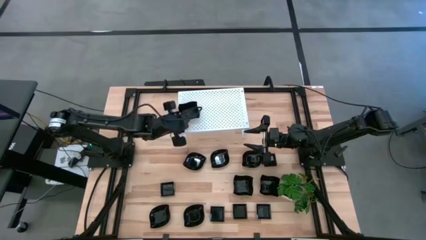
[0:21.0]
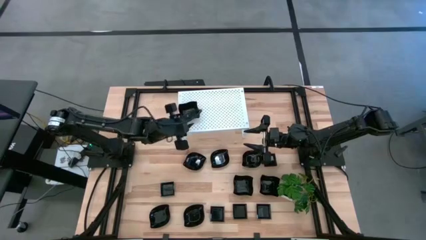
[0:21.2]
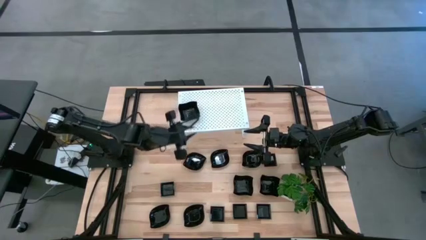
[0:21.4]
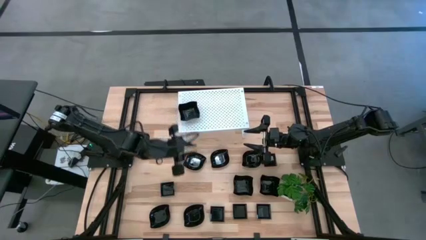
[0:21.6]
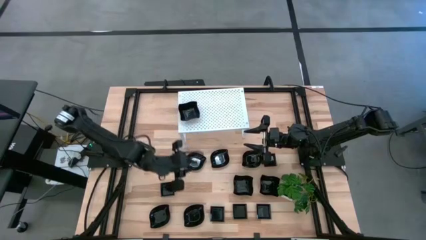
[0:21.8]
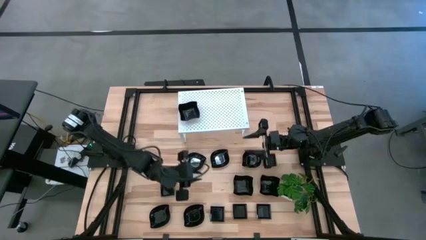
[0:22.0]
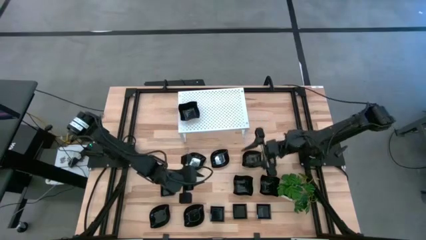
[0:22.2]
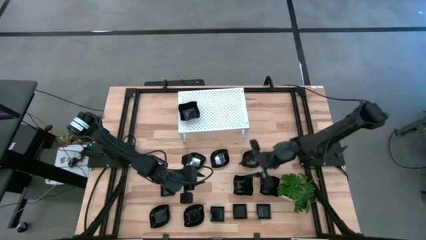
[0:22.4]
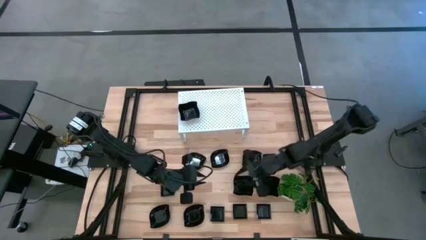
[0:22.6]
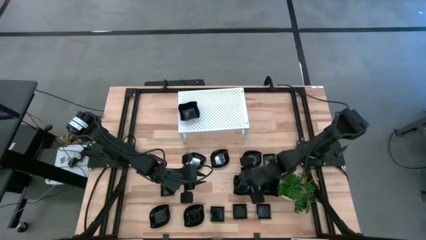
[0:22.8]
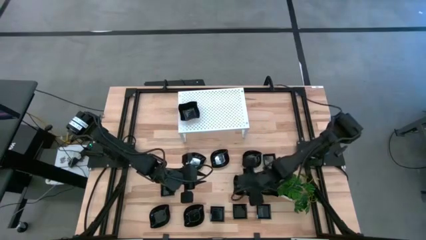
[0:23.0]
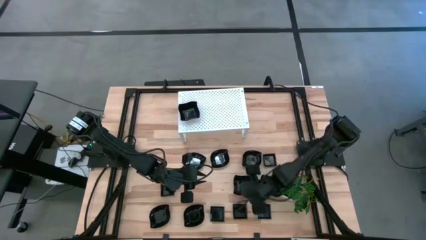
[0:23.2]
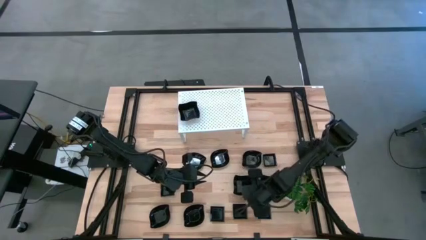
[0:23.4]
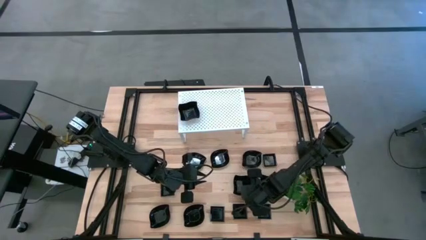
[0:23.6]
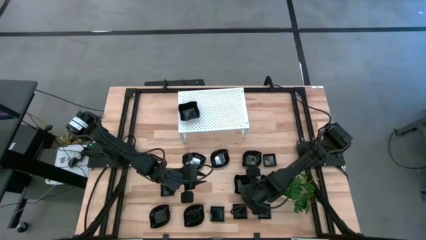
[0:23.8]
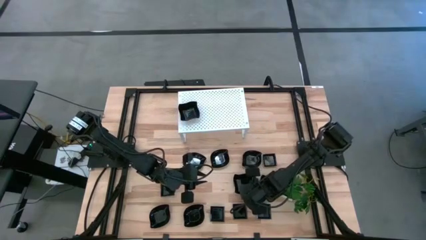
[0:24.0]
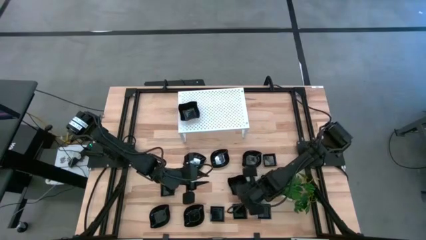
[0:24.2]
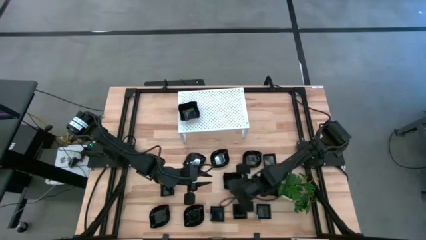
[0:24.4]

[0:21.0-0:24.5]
Task: Pick & Place Mini shaped plates
Stack the black distorted square plate on top of the black distorted square plate on the shelf

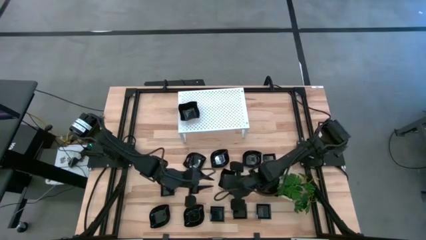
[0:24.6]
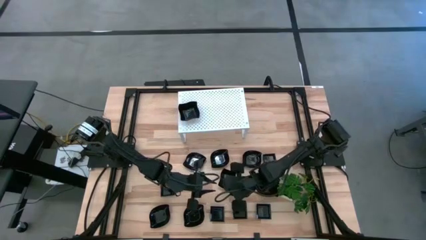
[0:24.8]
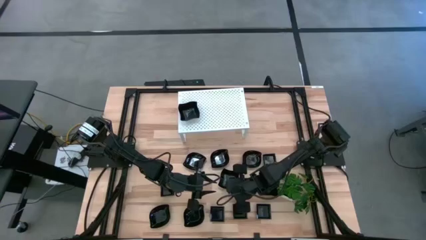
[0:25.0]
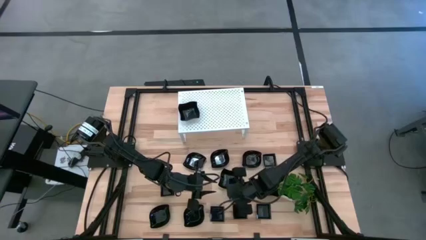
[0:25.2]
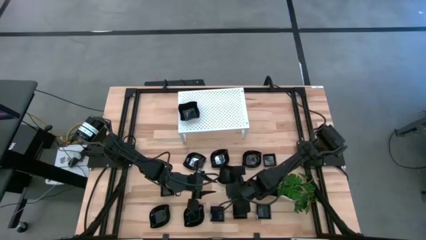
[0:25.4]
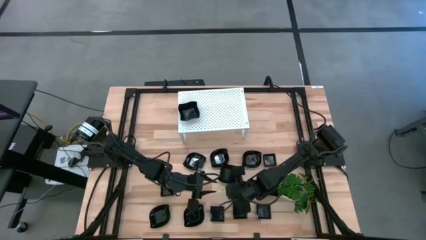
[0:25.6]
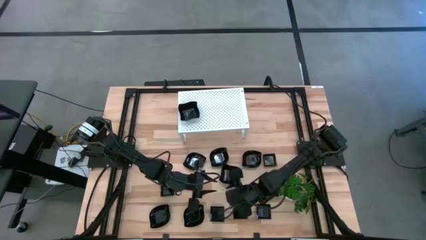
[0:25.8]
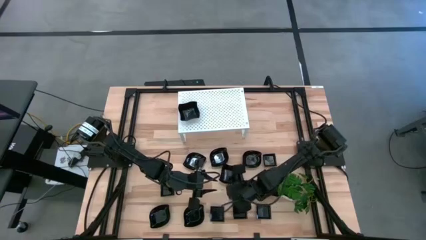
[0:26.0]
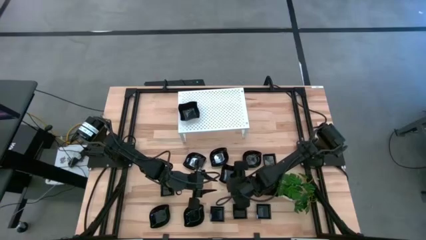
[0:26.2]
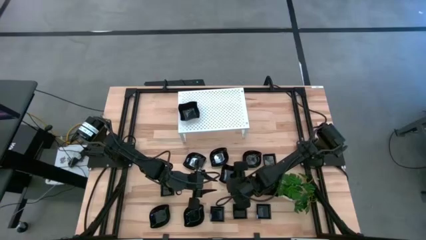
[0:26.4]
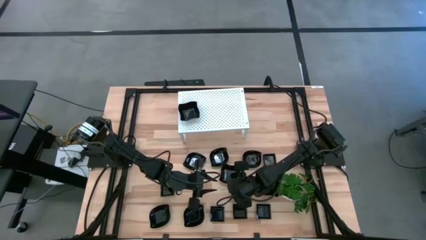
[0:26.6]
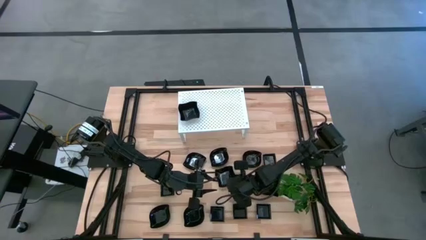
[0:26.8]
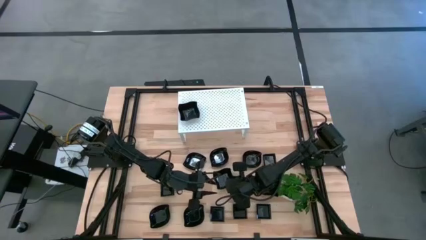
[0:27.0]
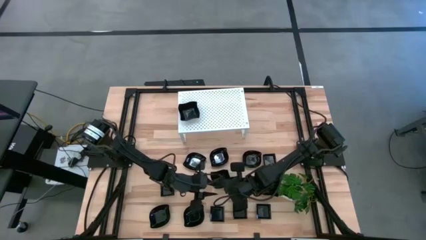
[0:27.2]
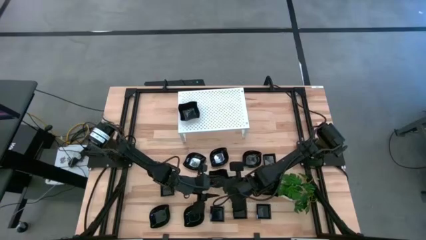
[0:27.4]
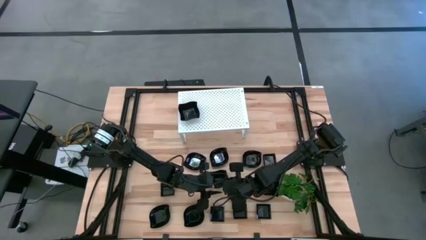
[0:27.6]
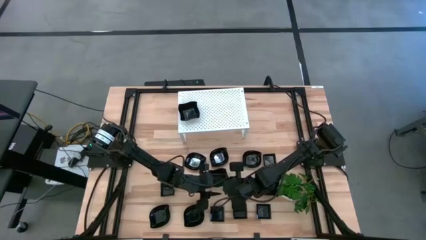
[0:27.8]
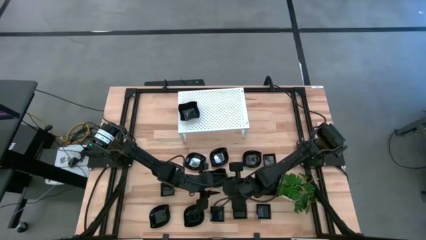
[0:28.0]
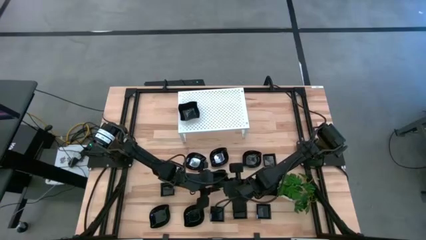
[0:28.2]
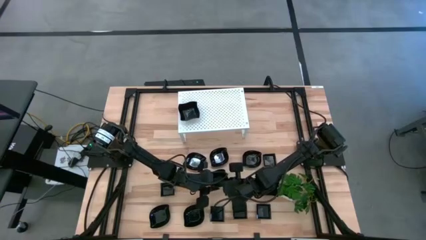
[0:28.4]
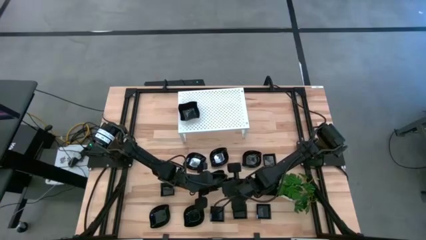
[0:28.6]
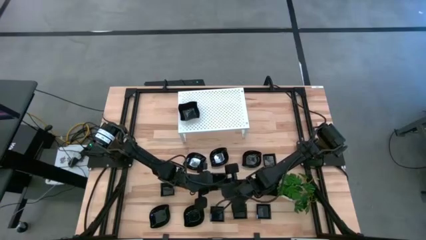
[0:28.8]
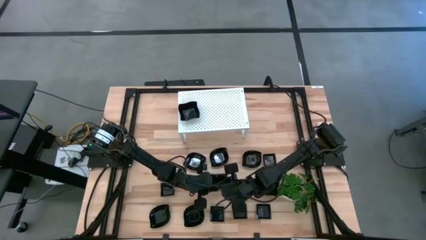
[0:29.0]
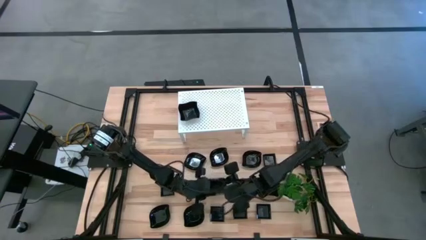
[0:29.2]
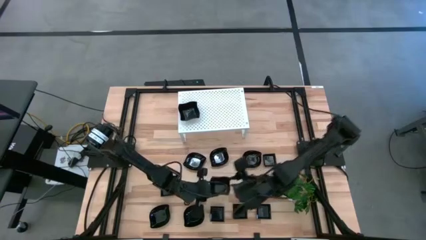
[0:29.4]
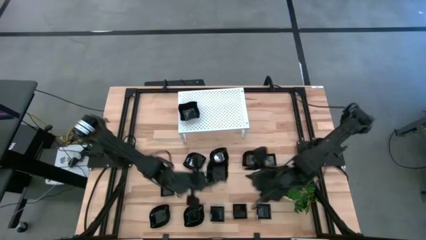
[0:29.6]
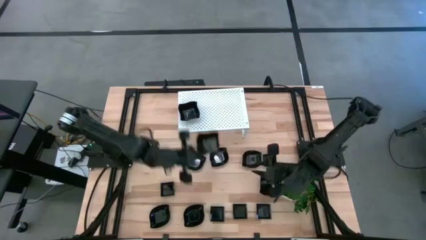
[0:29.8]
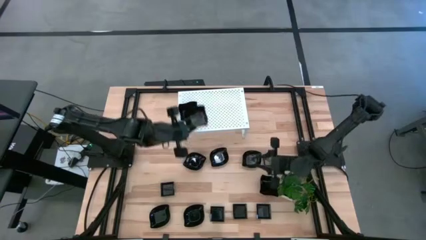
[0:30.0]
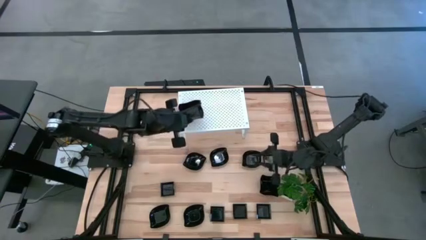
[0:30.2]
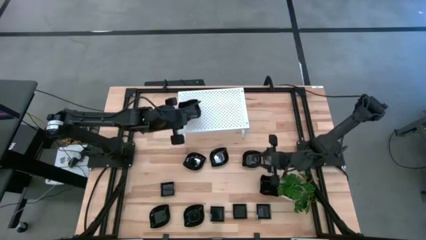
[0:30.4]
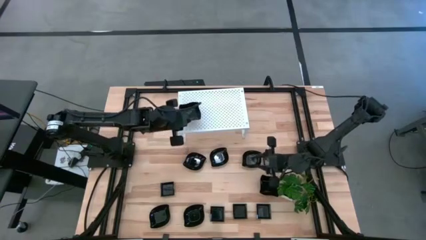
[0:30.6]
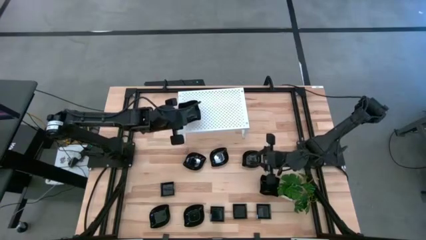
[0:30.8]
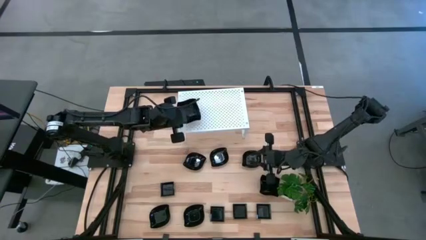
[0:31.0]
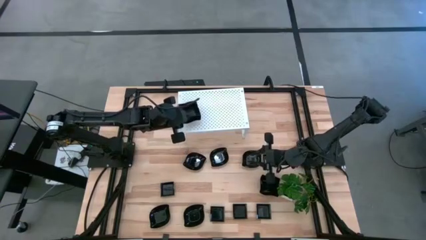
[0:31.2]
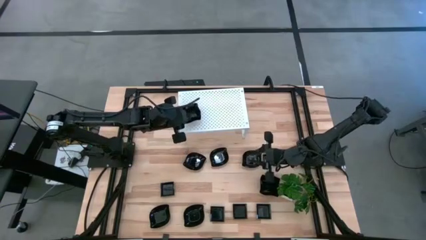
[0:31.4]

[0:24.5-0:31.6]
Stack the black distorted square plate on top of the black distorted square plate on the shelf

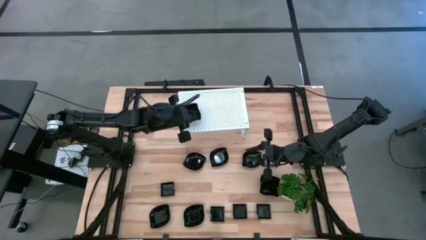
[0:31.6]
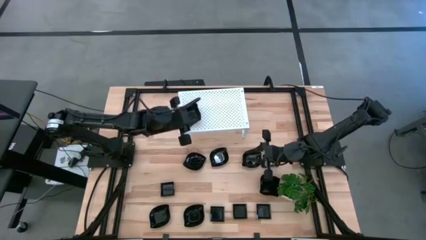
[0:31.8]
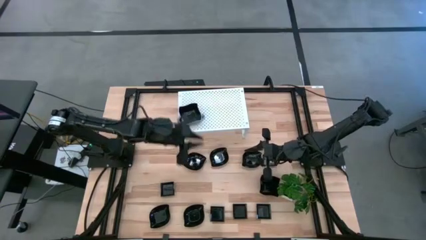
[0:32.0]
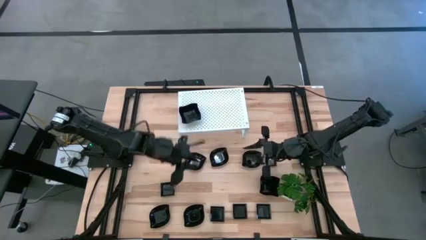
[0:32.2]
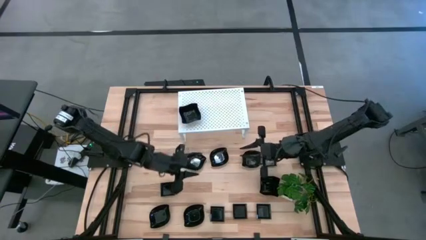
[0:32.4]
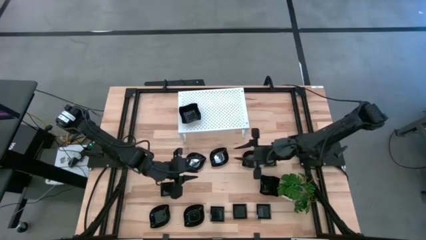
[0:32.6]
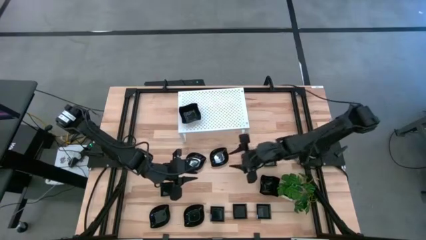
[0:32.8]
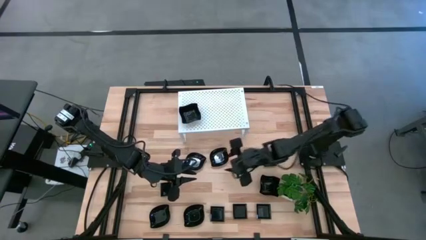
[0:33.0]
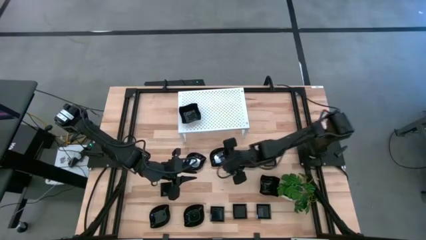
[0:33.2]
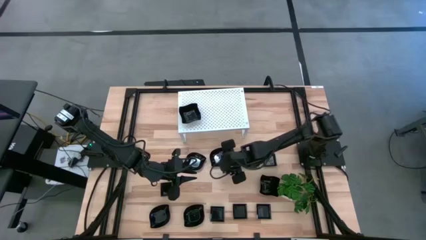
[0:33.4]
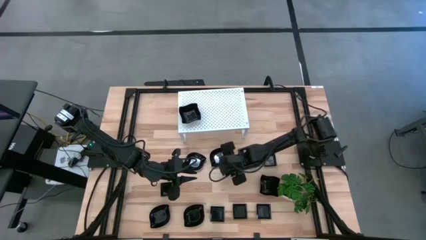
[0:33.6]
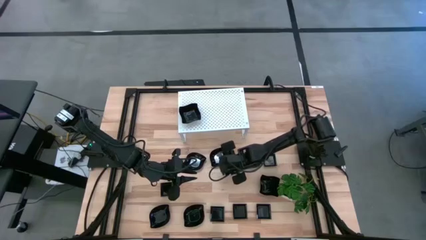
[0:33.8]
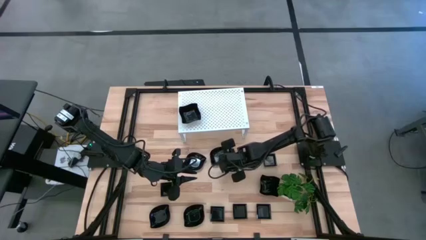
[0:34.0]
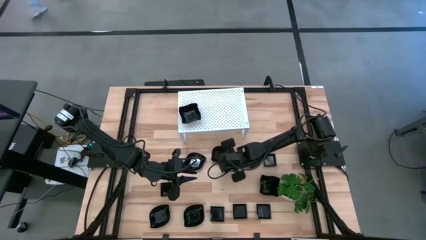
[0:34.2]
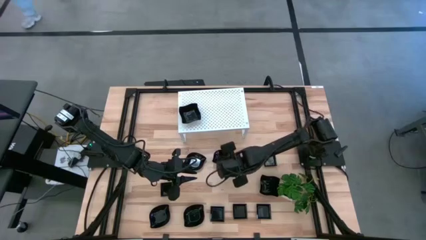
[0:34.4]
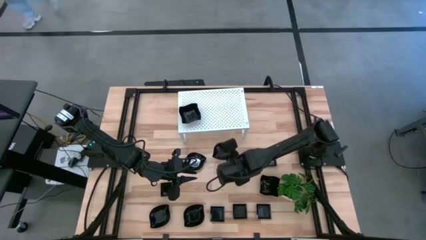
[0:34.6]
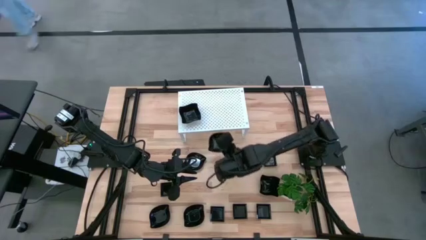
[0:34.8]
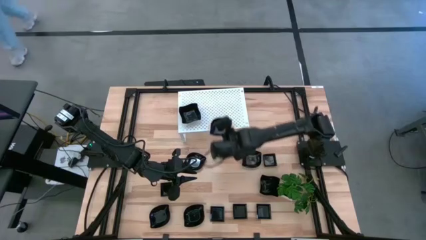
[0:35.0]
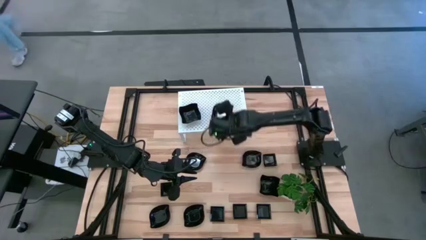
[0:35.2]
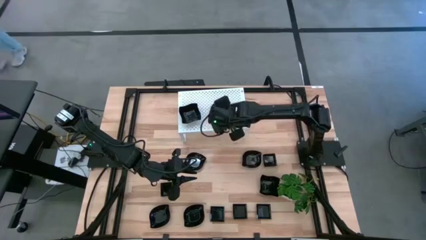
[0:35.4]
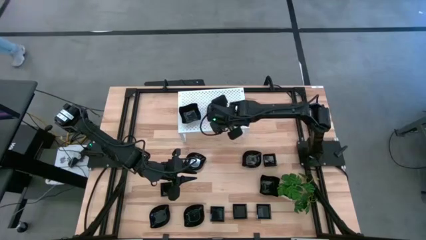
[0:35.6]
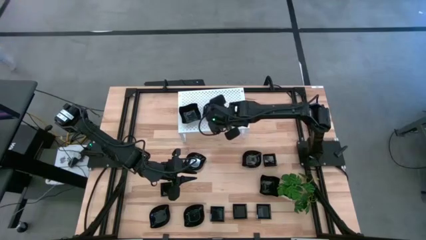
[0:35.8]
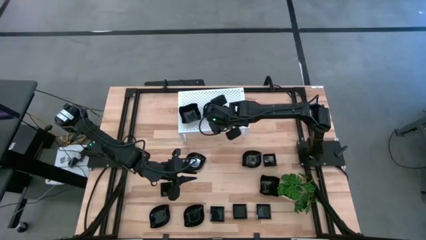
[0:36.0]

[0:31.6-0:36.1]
Put the black leaf shaped plate on the shelf

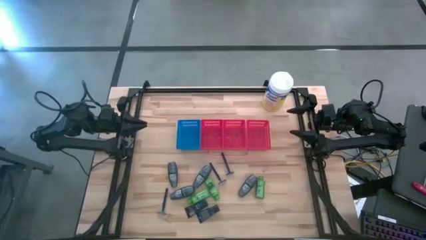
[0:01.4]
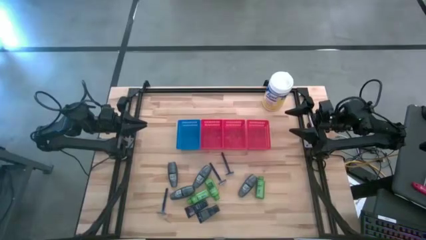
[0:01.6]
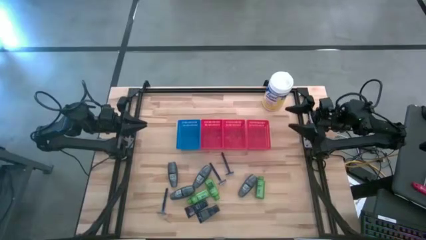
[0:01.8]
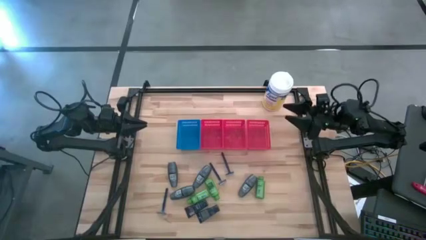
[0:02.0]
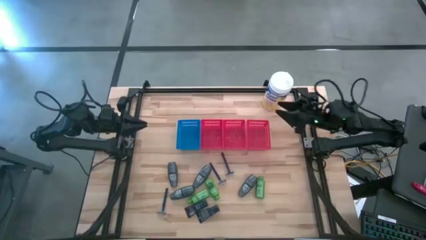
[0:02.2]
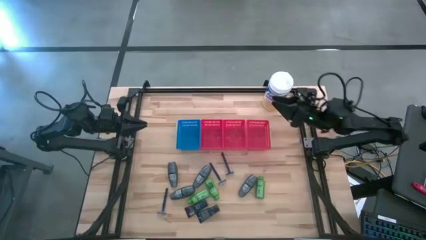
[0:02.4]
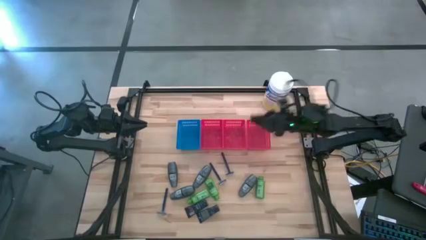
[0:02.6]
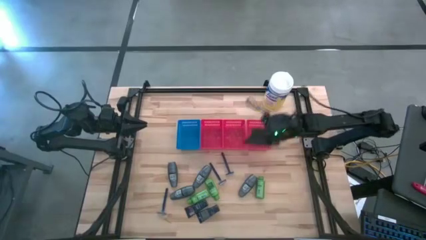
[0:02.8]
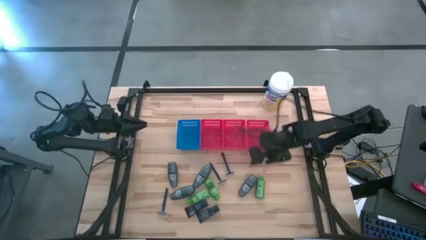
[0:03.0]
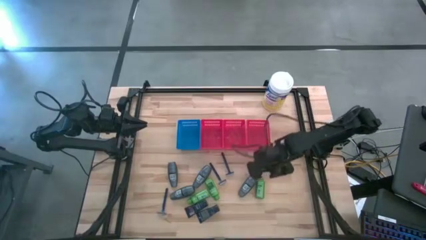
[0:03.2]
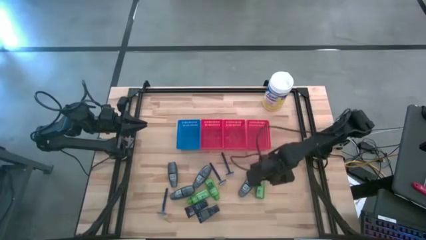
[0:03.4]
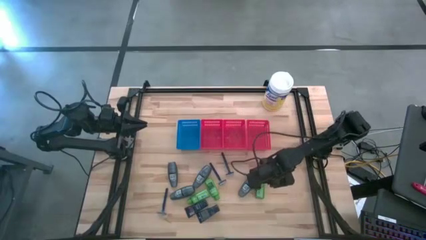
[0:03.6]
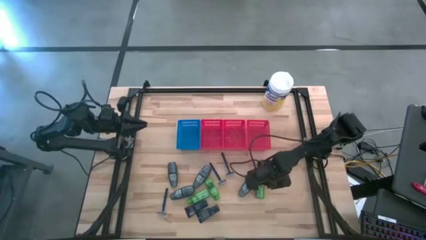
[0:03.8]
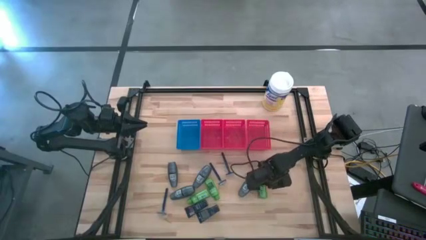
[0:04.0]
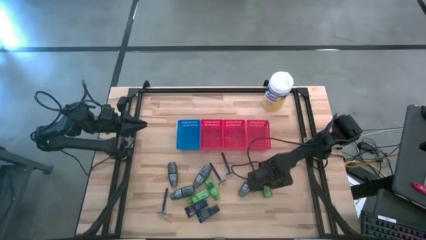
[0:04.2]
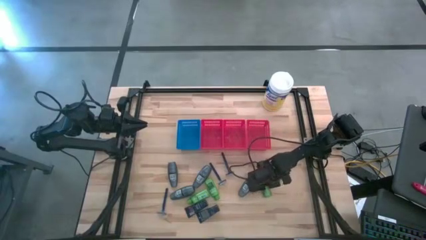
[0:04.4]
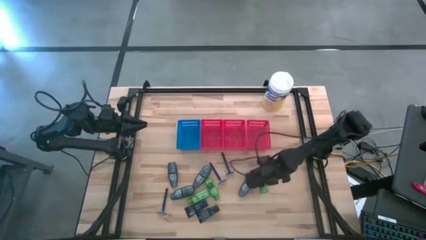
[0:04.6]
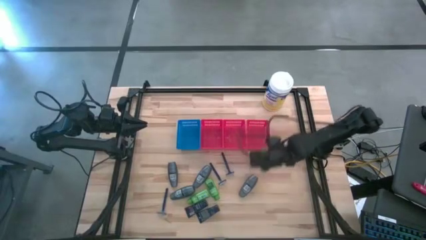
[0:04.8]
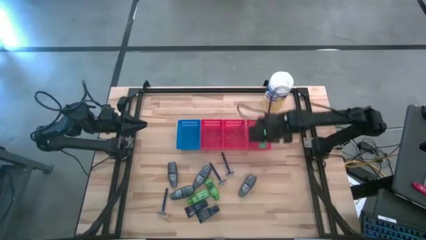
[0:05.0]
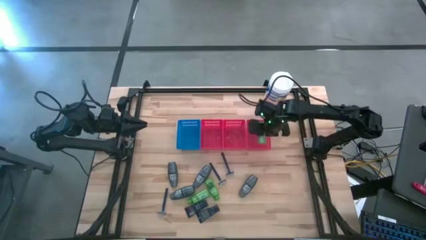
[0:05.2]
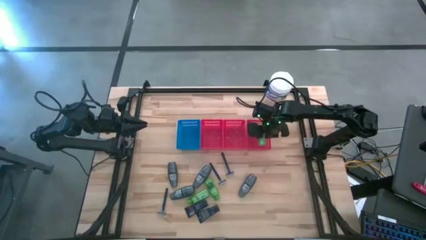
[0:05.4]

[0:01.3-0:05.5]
Task: Pick & Place Travel size toiletries
Put the green shampoo bottle into the right red bin
